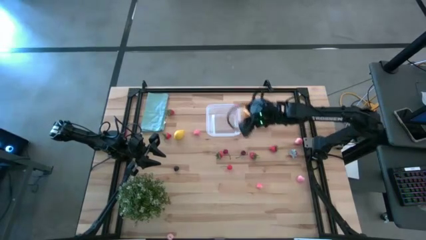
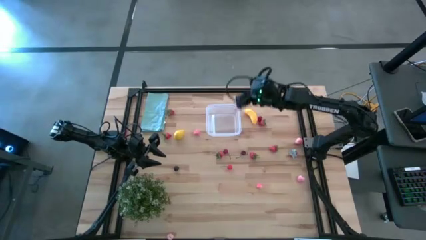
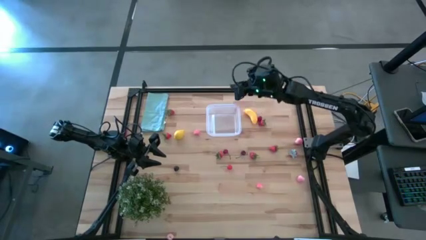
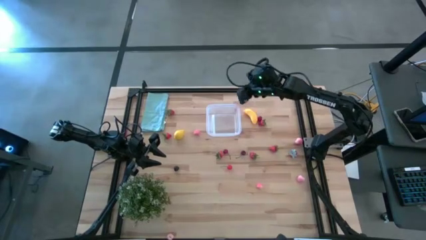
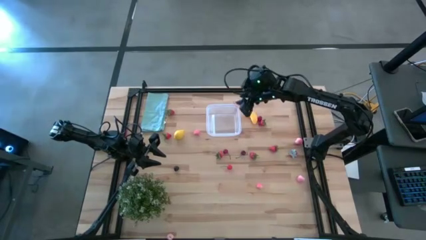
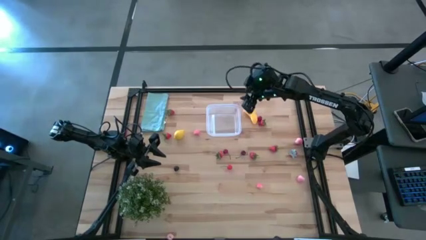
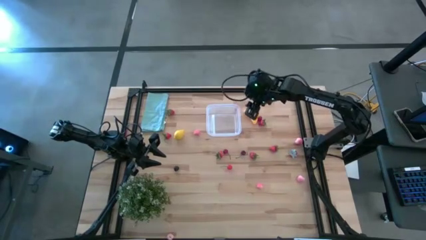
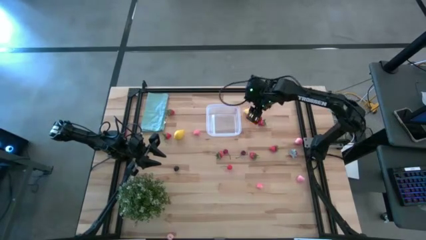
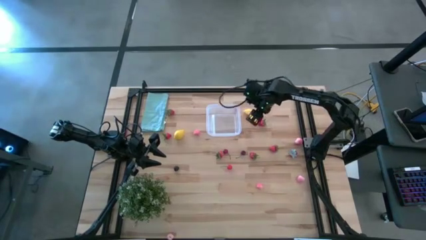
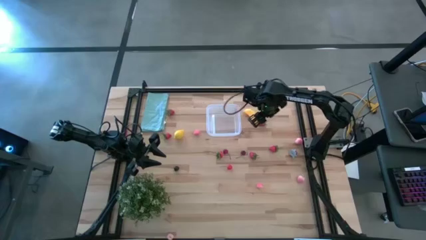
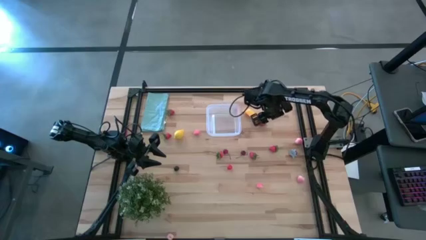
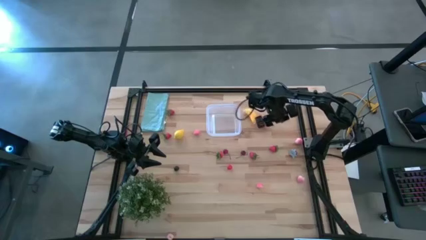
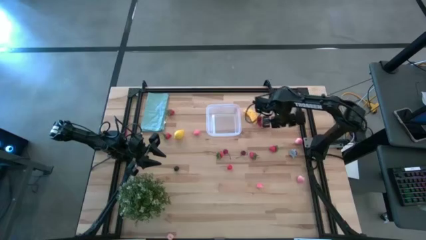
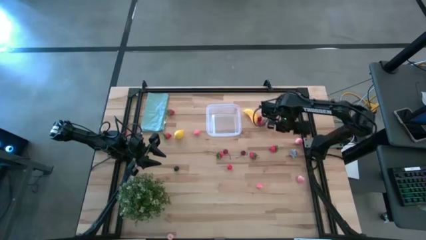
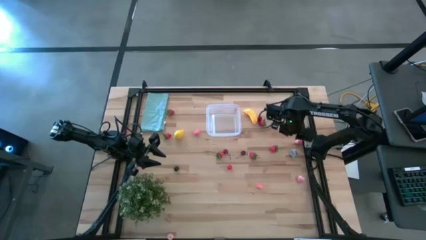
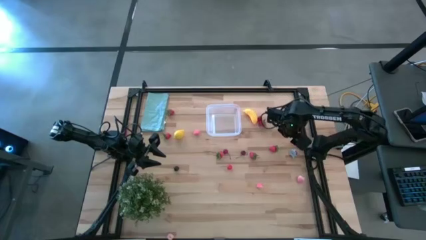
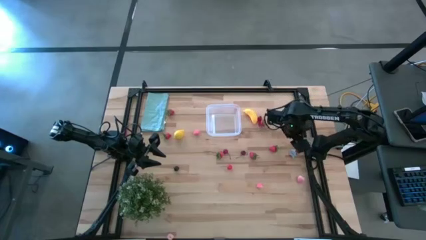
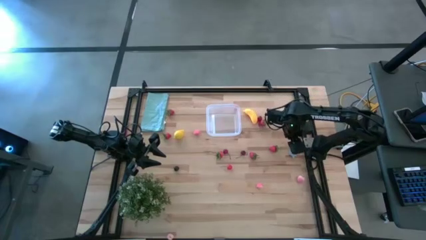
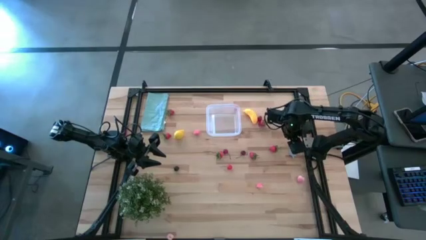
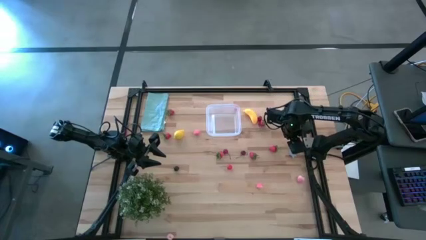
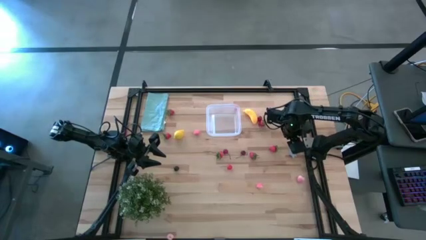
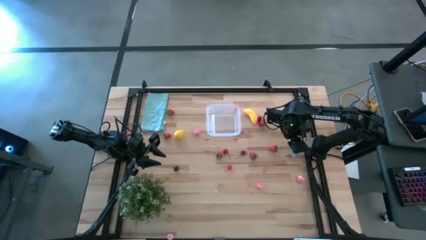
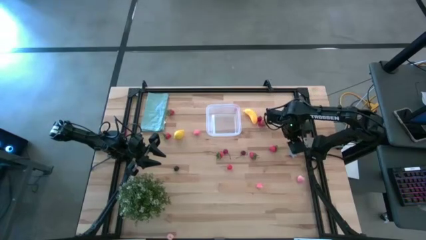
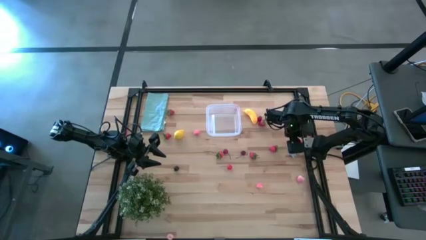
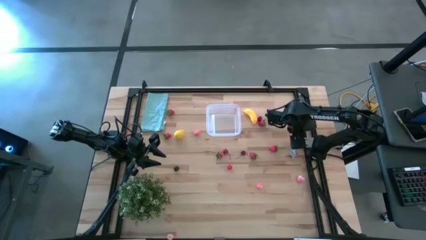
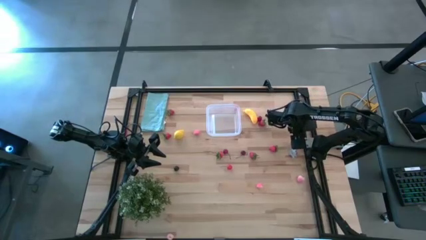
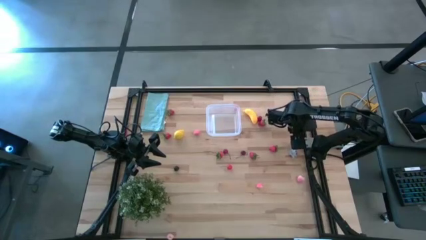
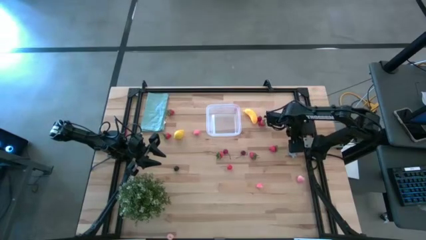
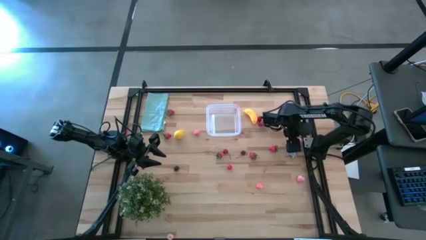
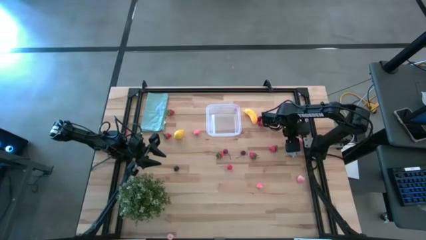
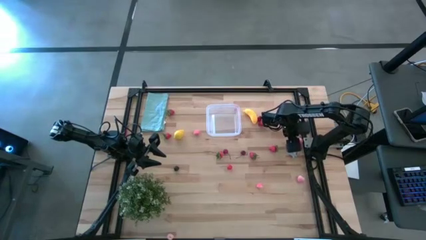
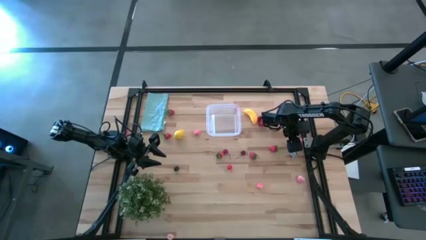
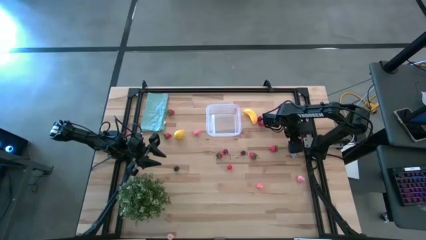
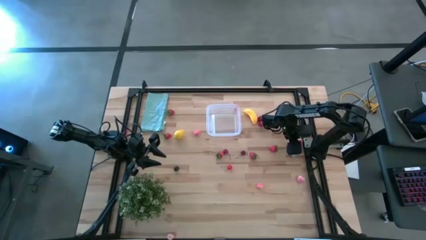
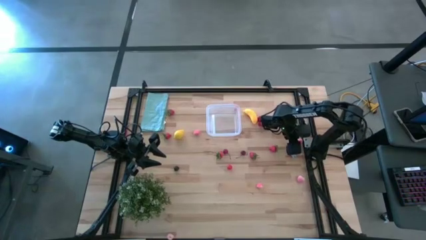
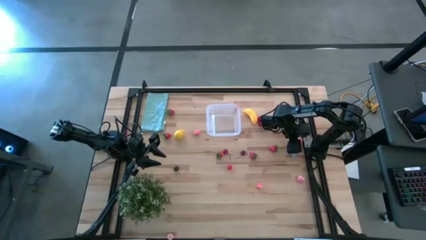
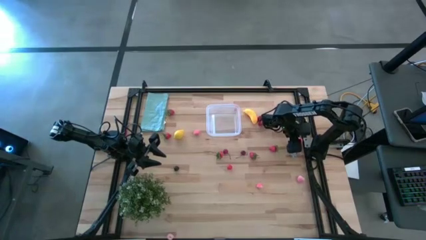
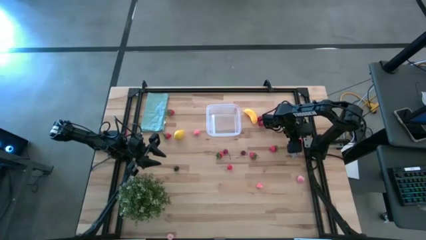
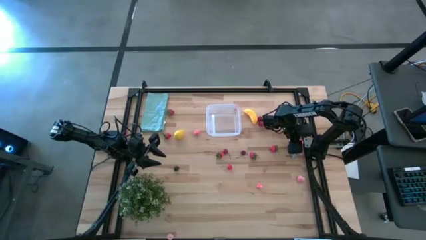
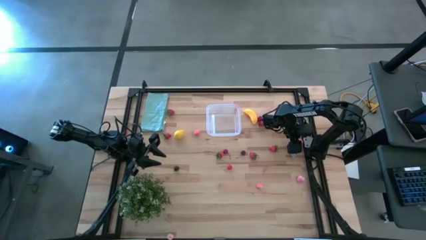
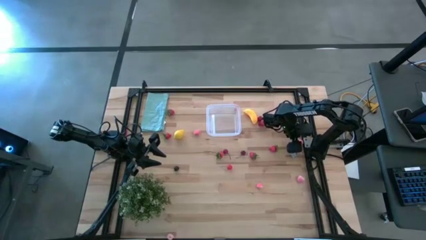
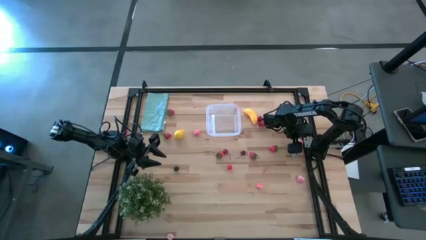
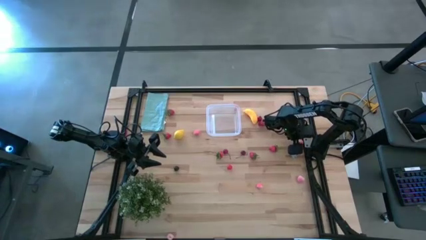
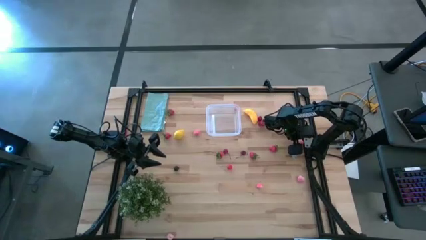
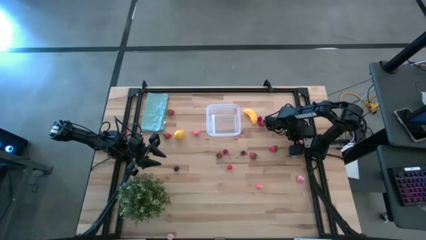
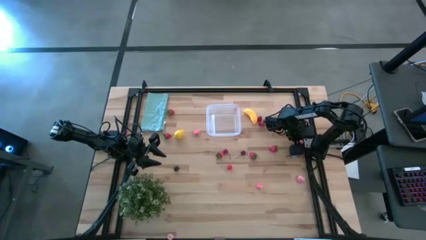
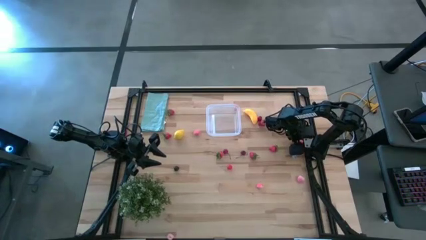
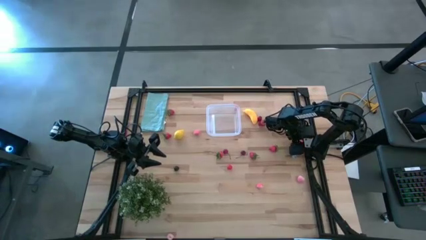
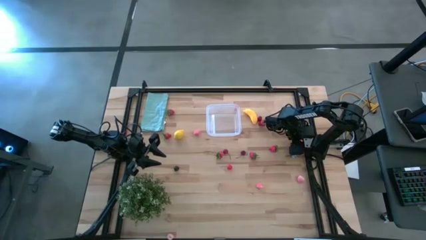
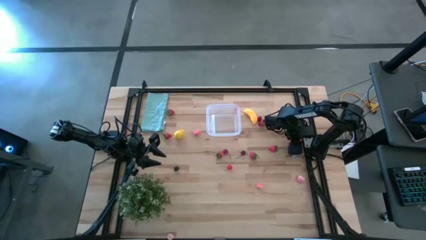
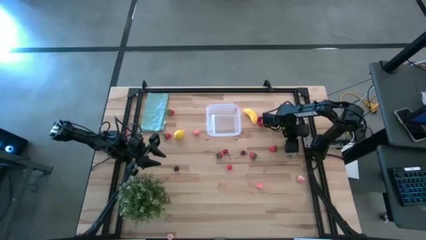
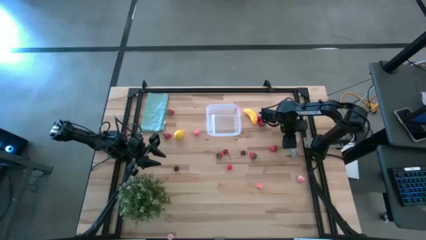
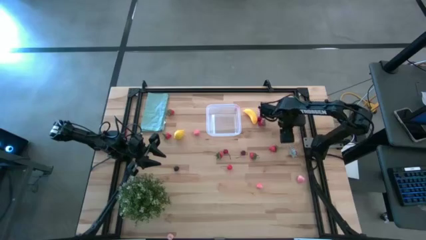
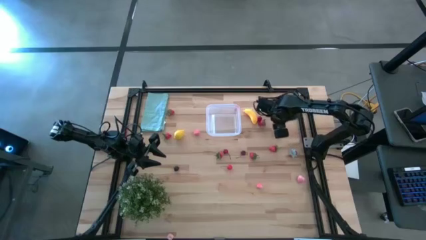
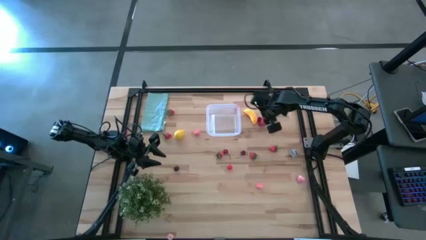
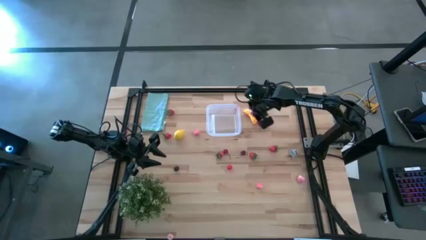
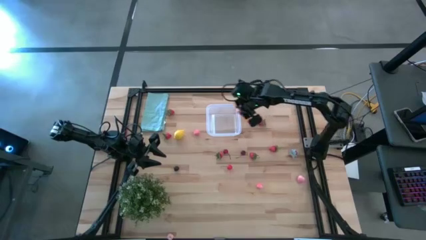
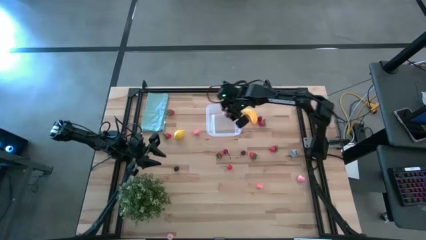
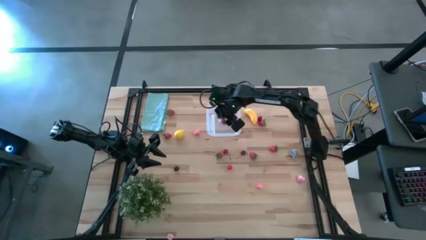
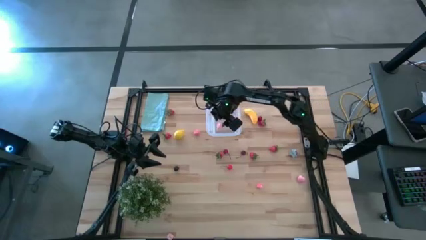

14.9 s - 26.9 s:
Task: Pick and placing Produce into tupperware
Put the pink peach into the transparent bin

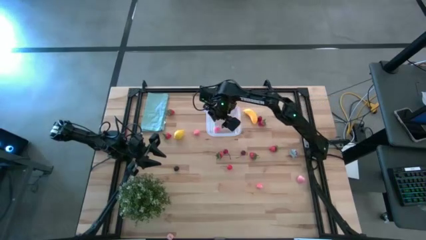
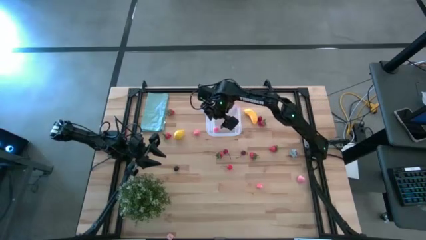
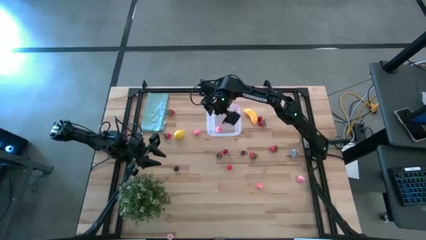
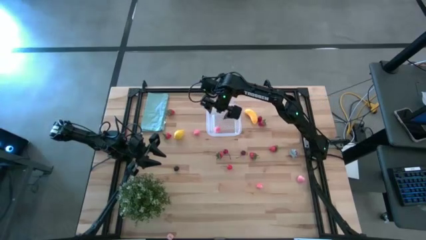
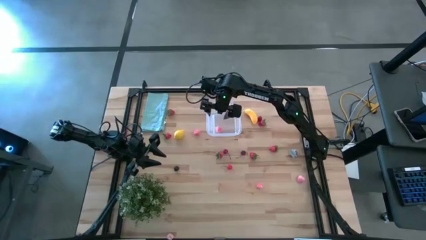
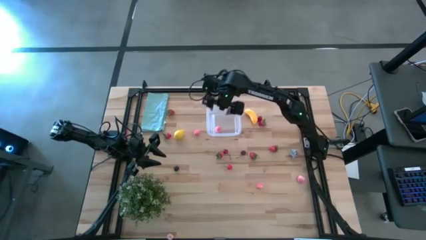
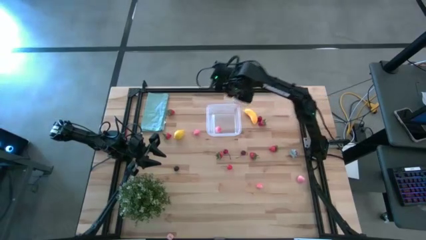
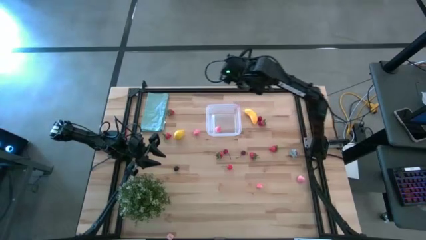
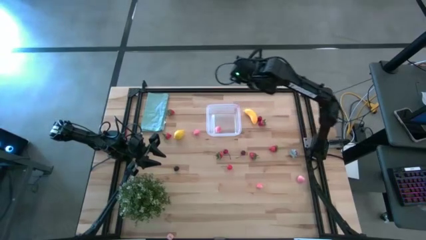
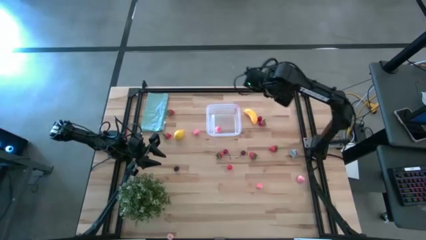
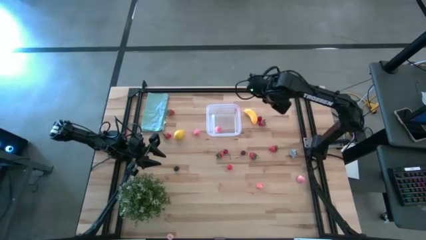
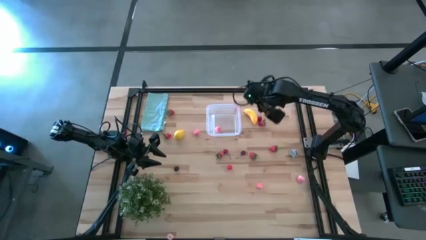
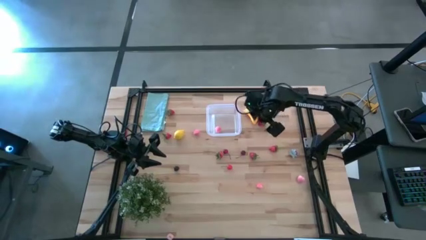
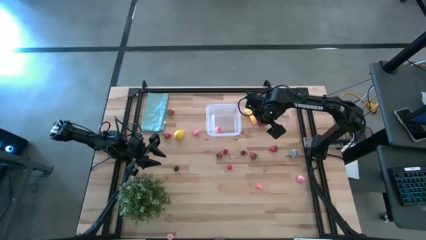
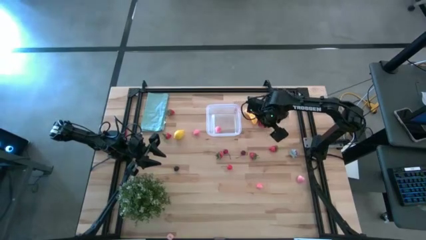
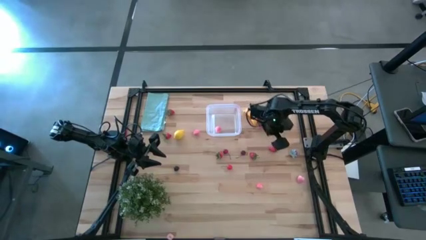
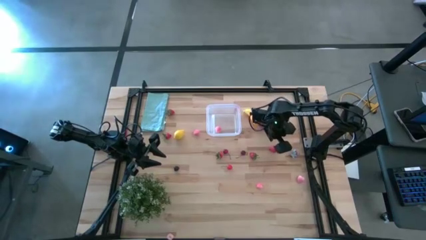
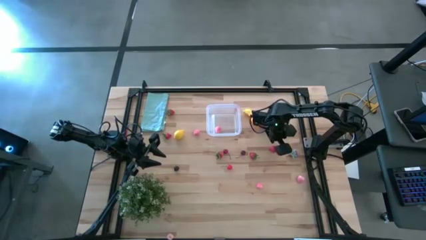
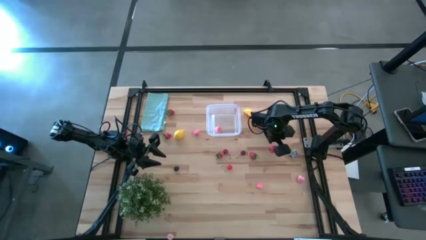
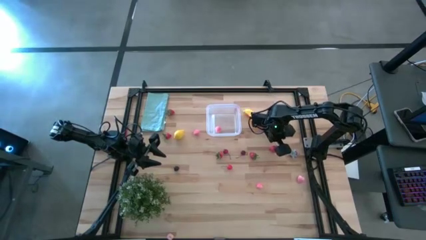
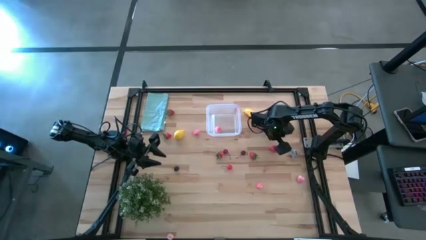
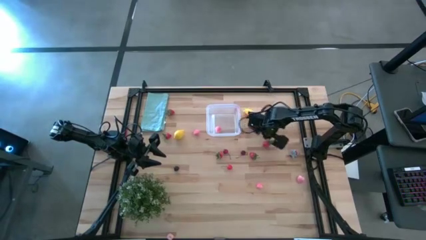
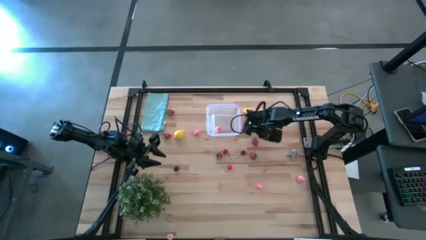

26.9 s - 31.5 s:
Move the red strawberry to the center of the table
